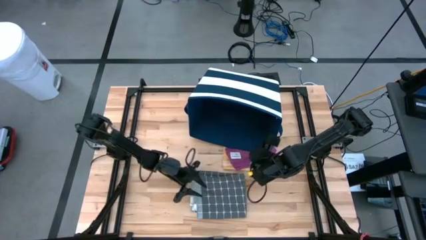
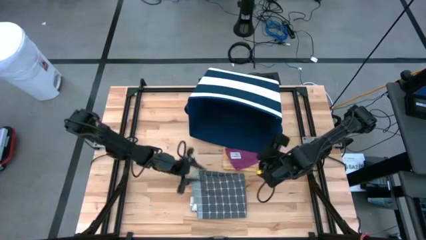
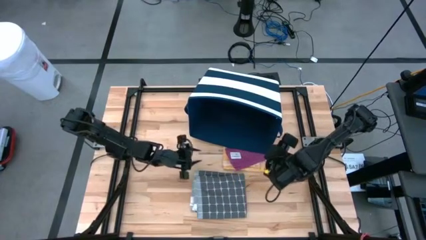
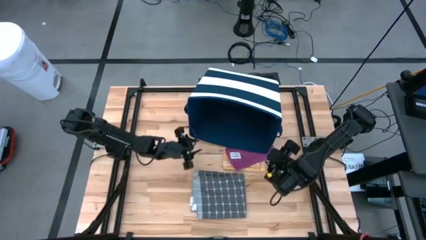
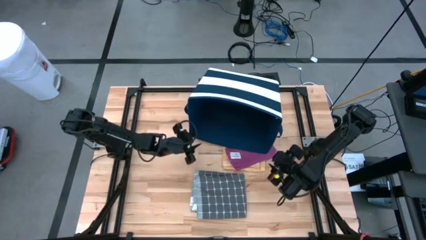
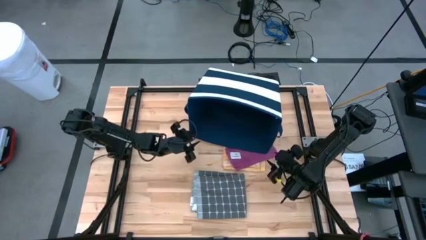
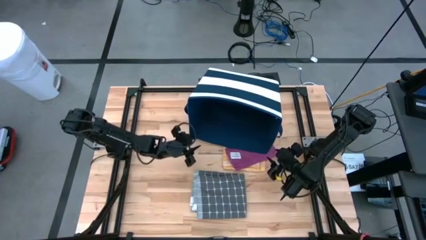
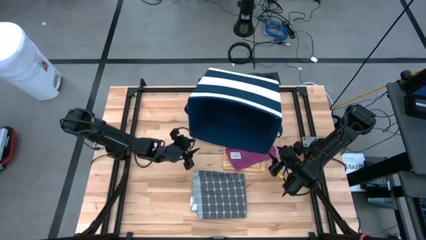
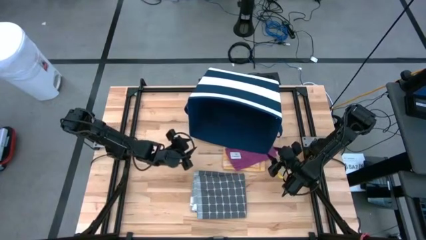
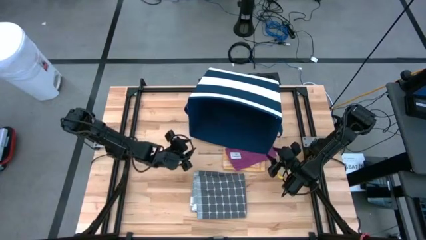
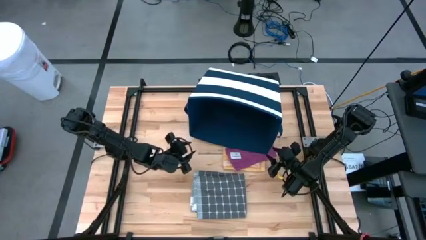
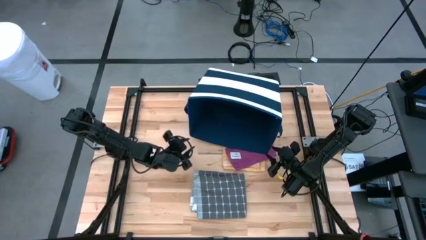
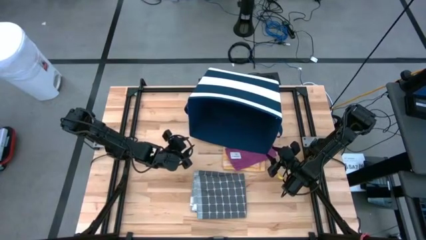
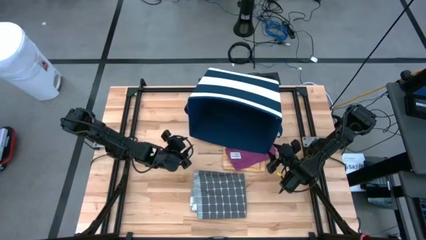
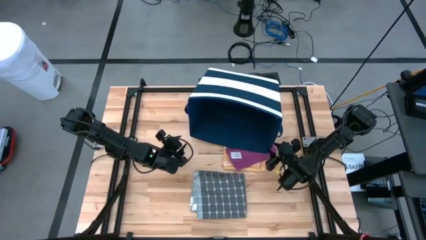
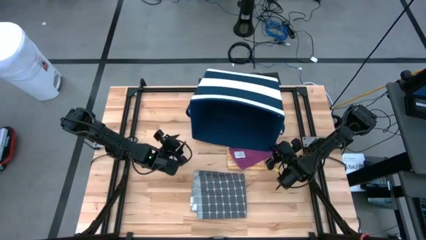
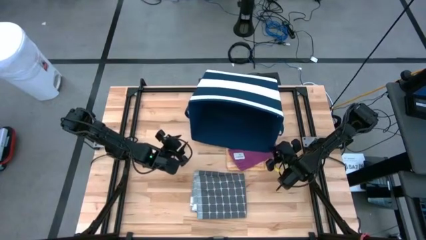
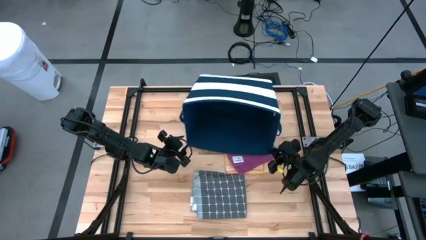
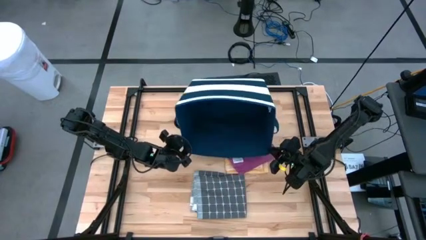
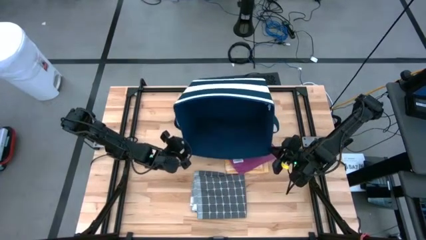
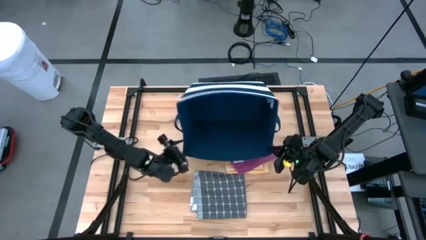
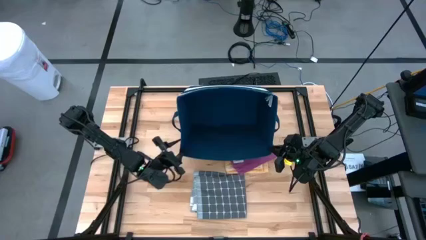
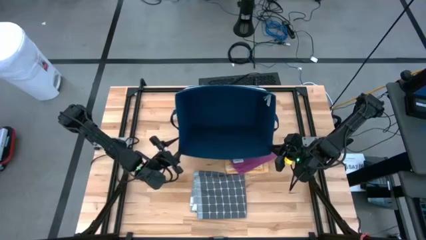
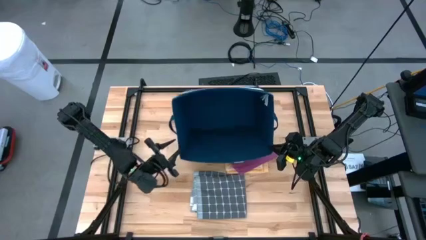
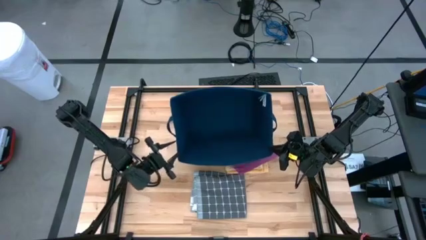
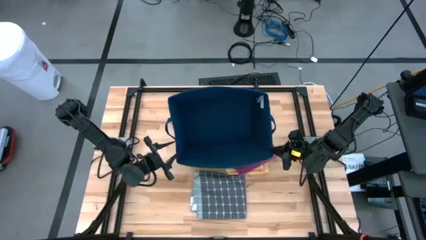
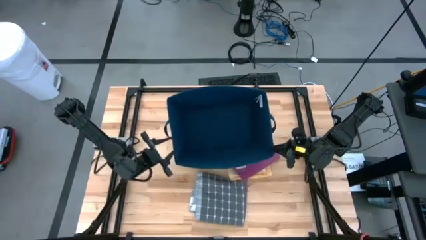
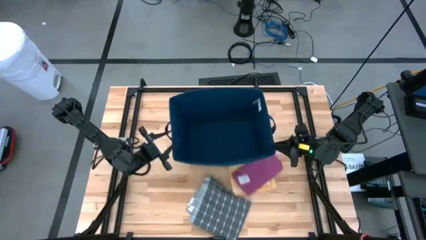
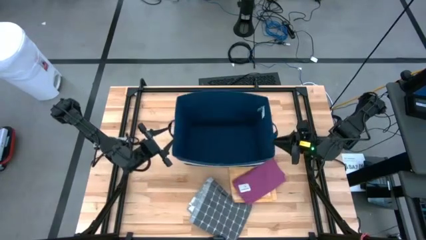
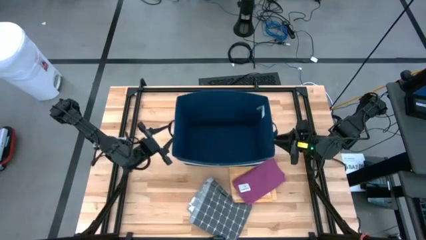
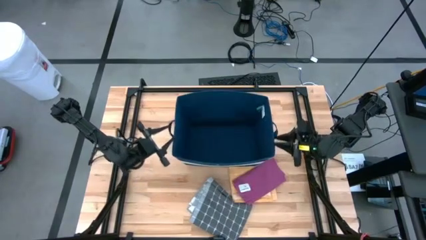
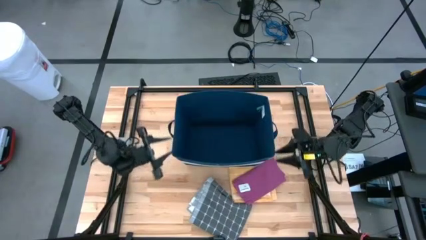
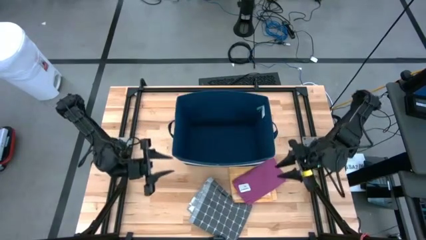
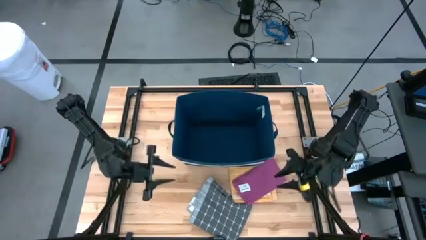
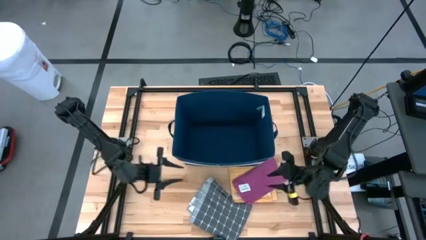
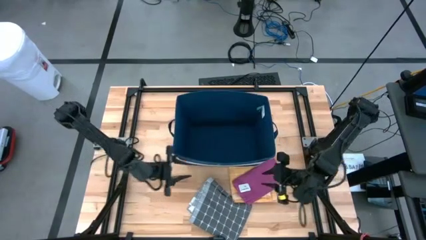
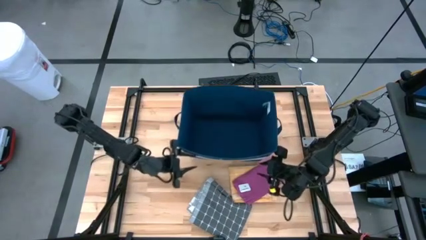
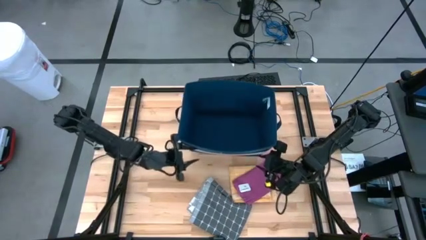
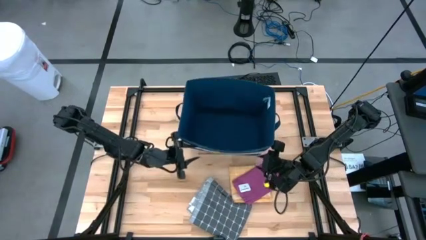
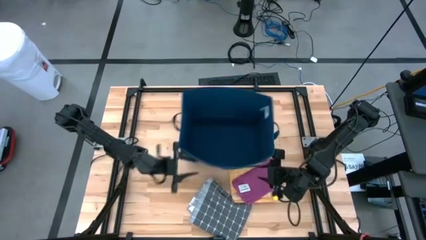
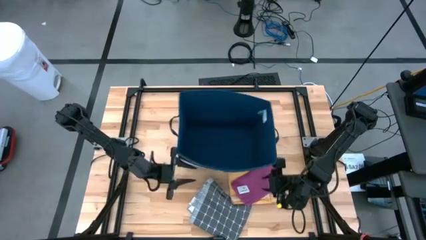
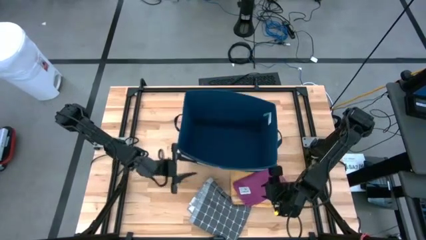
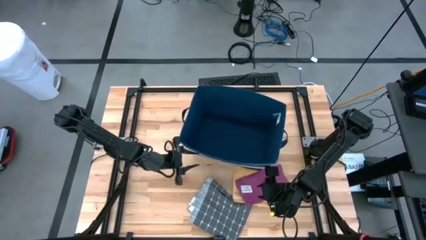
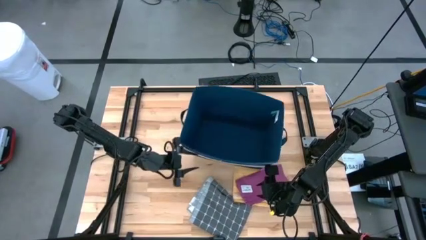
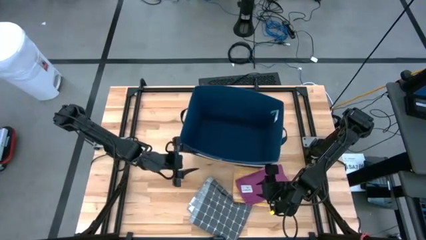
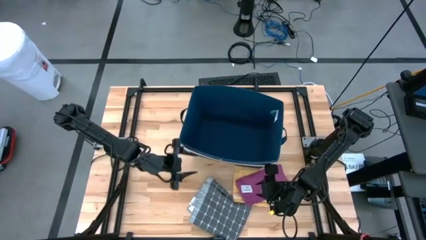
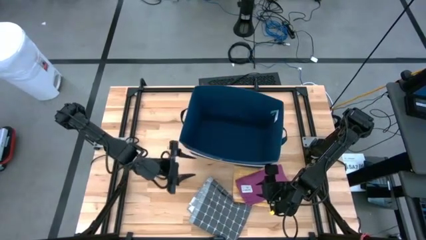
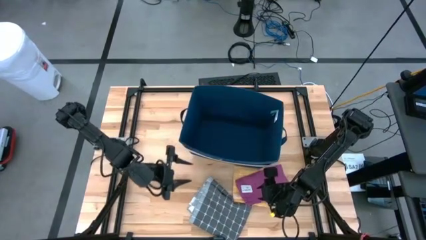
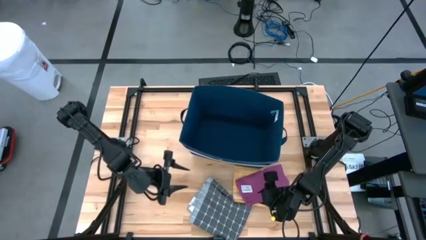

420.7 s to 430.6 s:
Task: Fold towel
Prepare the blue bin

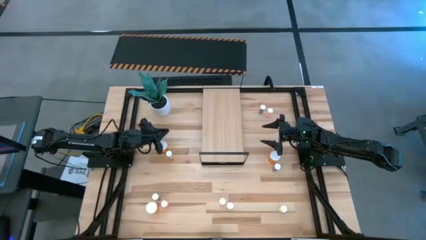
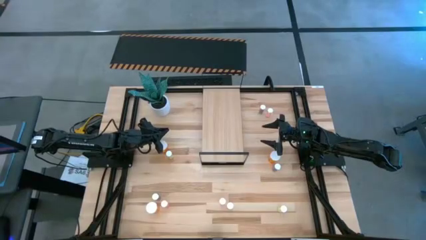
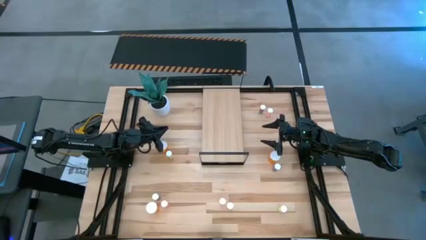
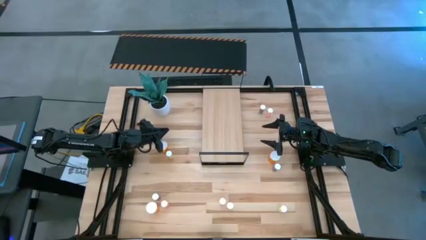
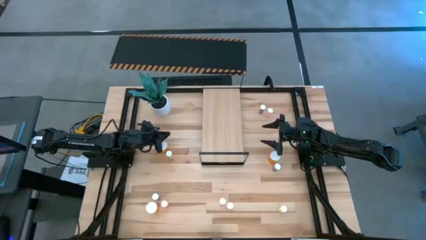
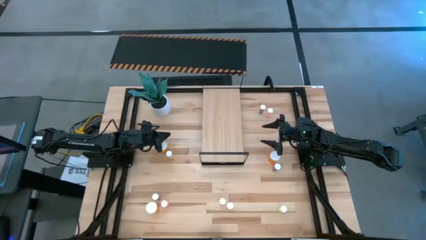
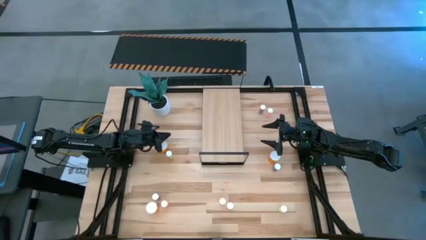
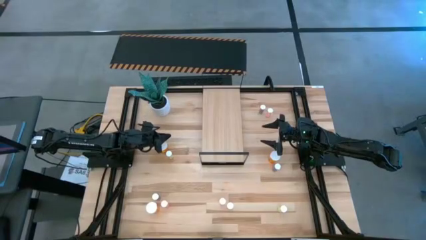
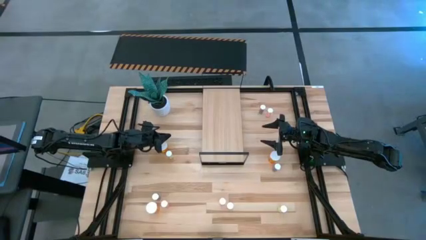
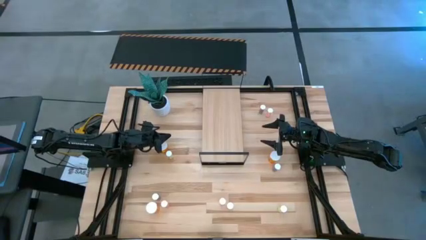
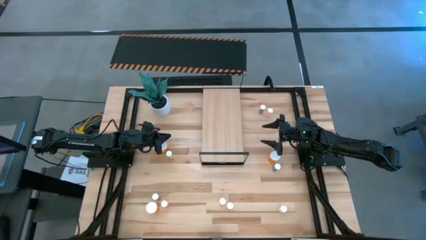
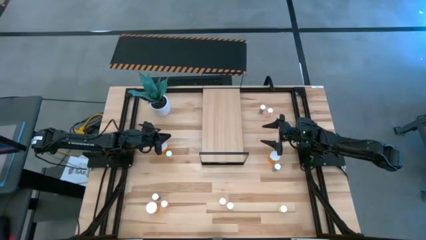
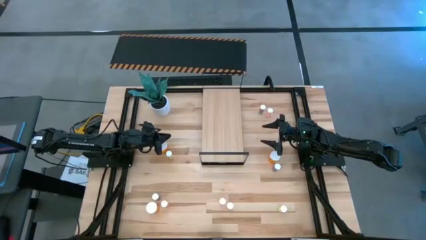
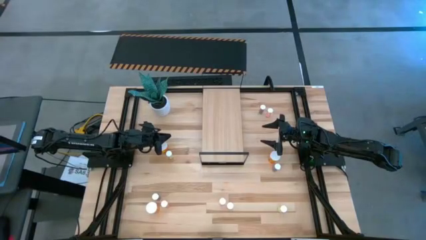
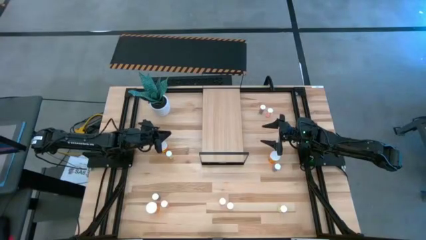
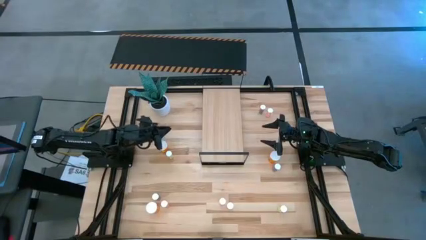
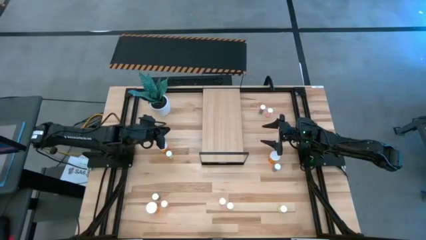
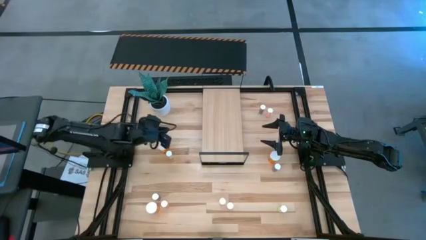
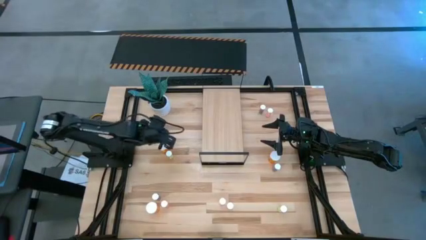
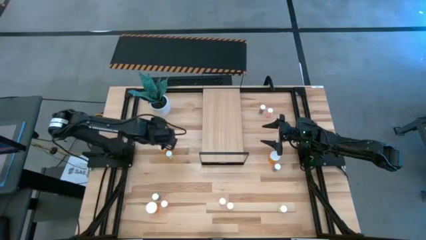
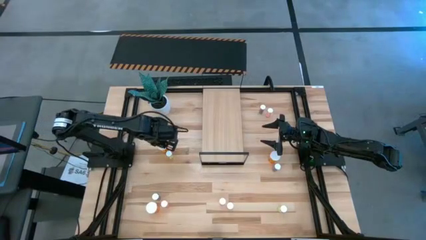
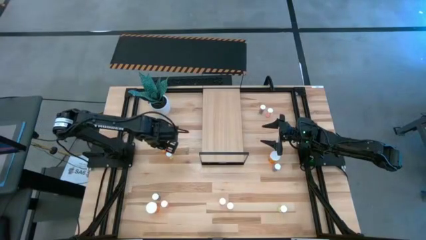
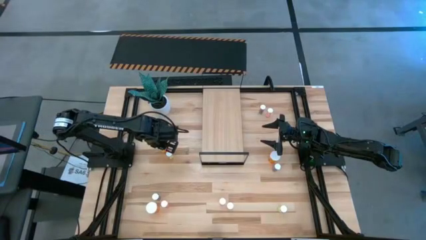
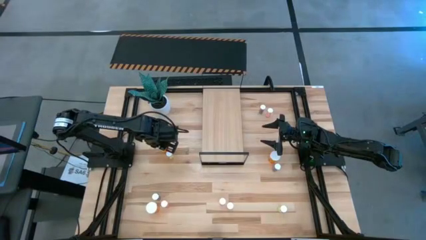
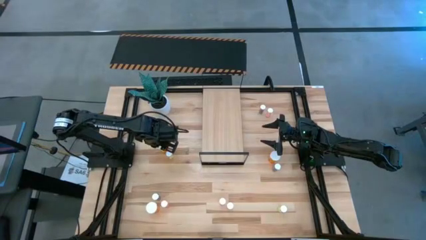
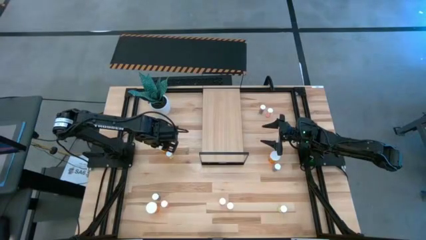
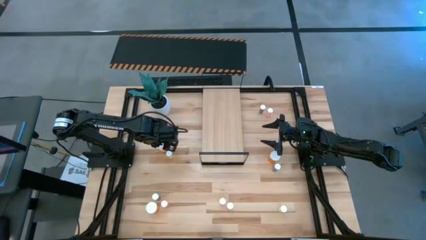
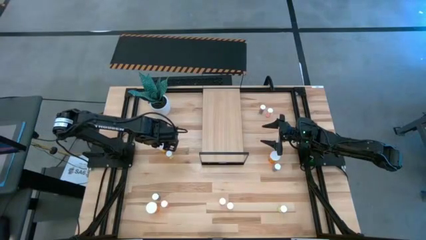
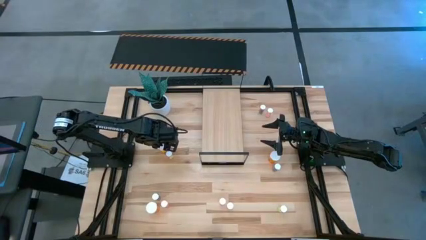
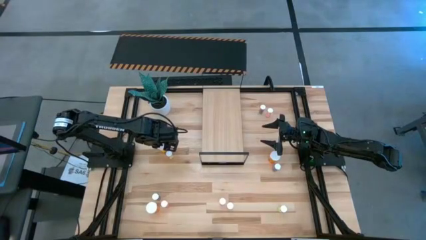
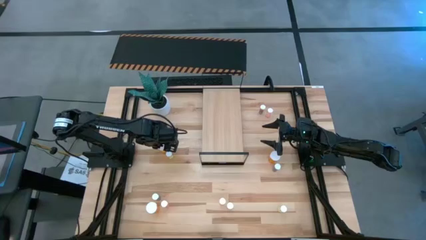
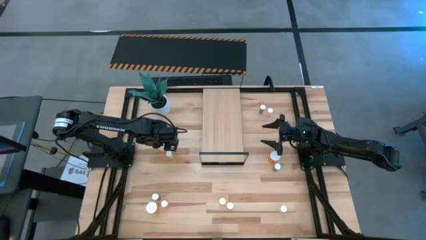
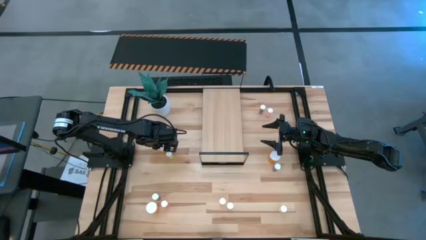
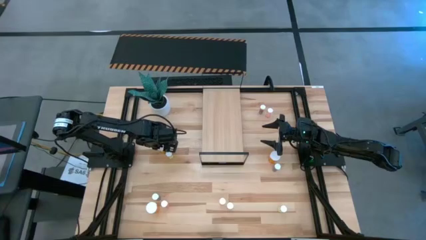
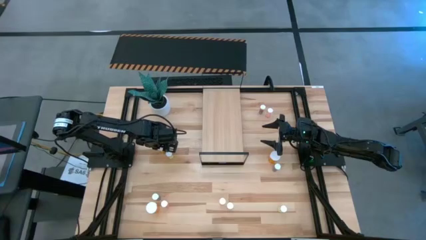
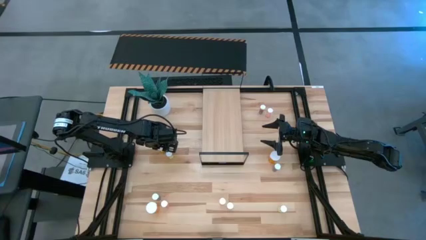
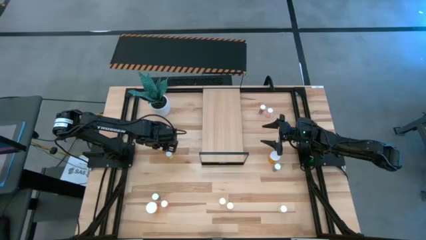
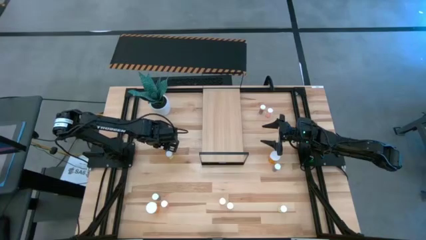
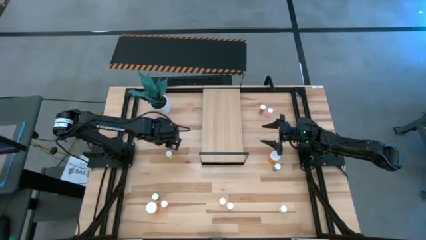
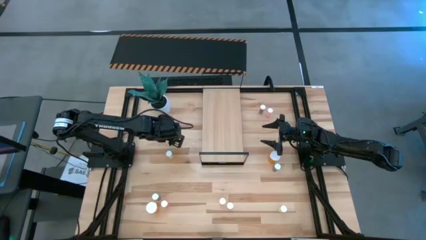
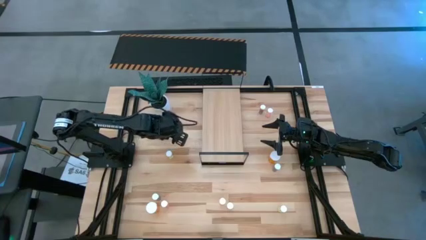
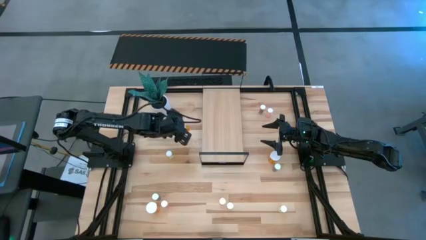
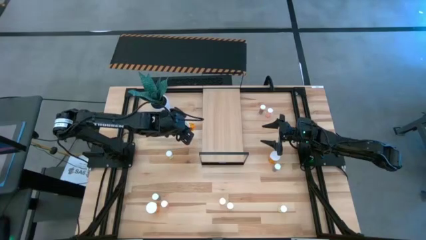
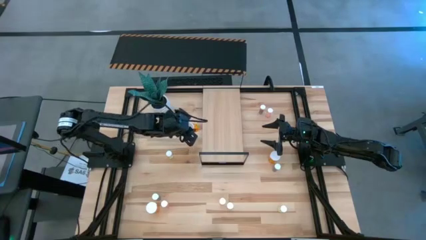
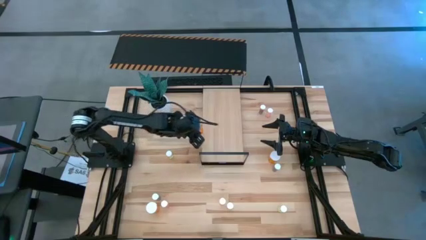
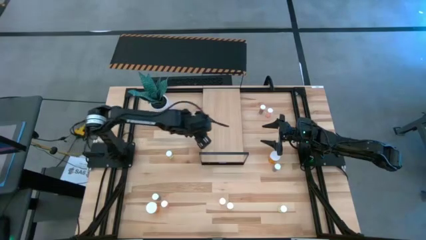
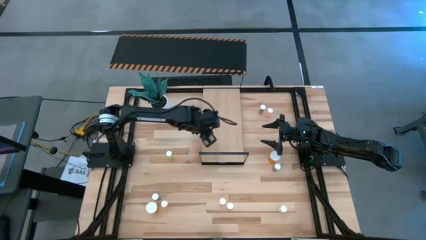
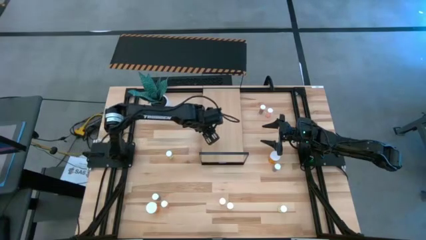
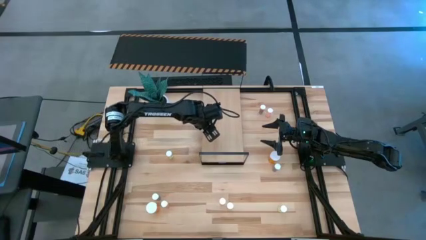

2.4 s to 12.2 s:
Task: Pick and place medicine bottles onto shelf by color
Put the top left large orange pill bottle on the shelf
